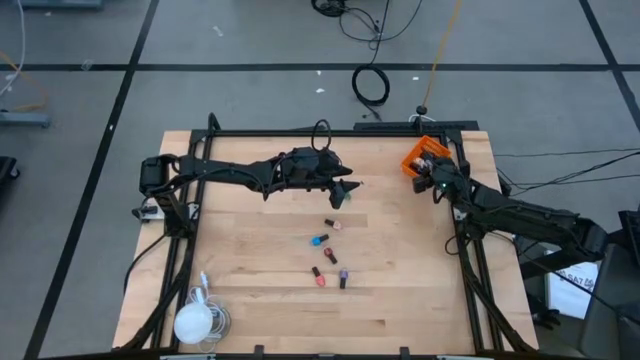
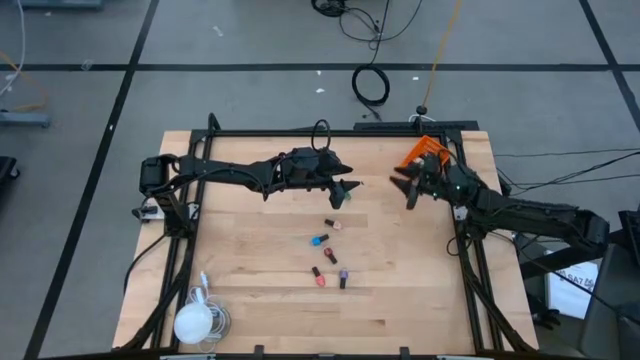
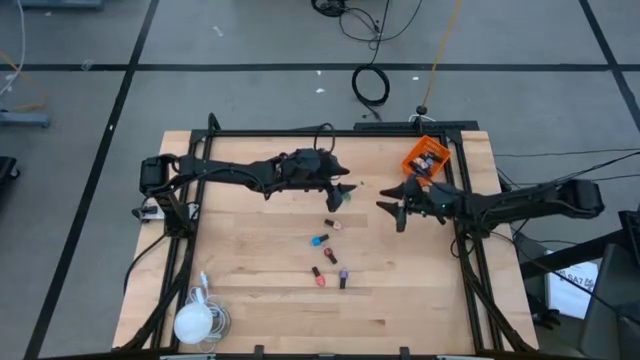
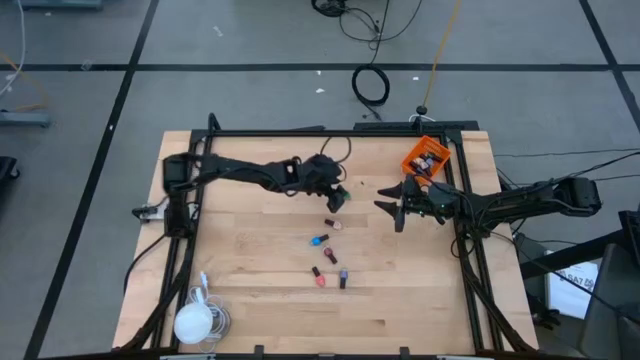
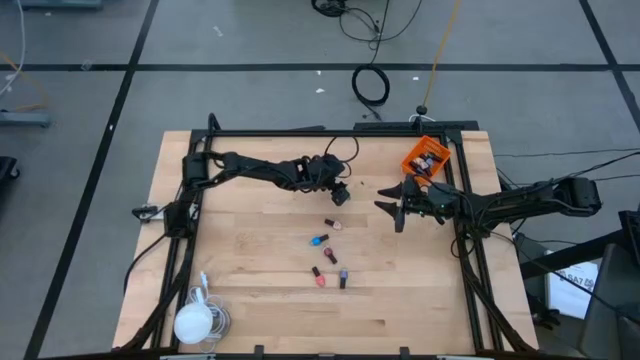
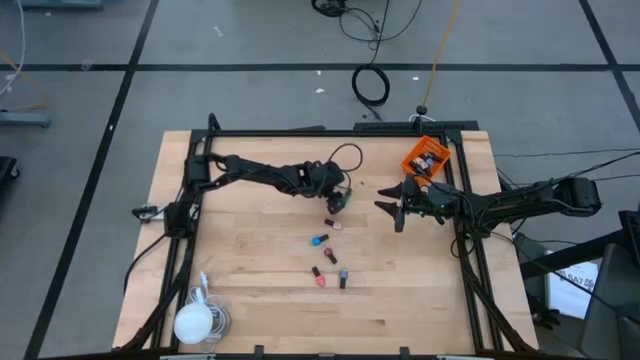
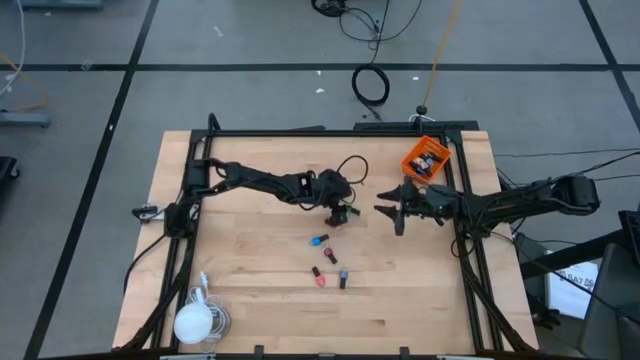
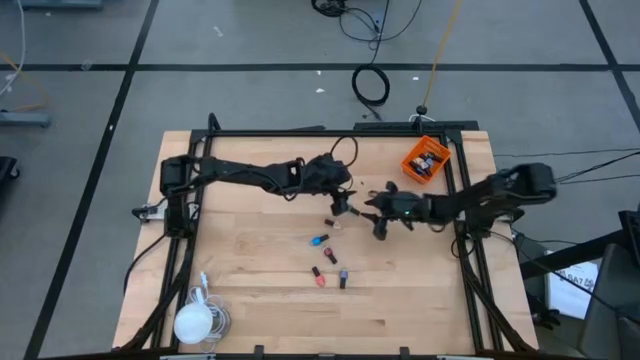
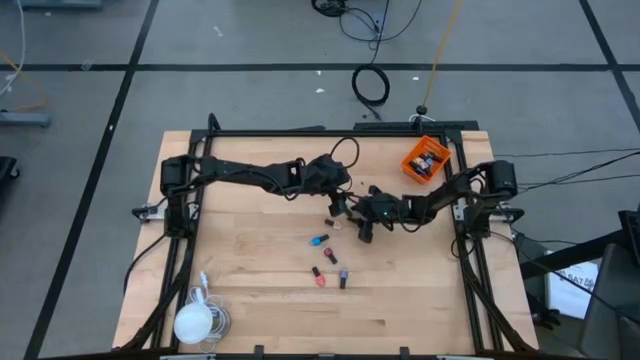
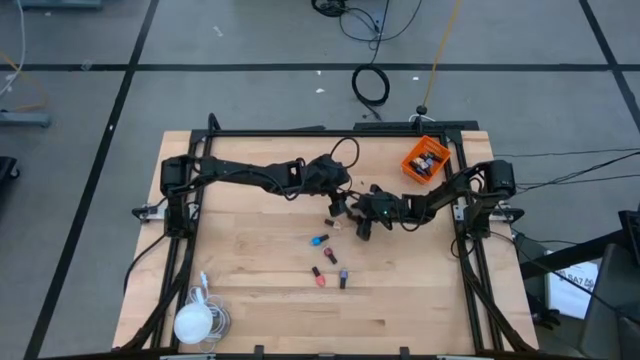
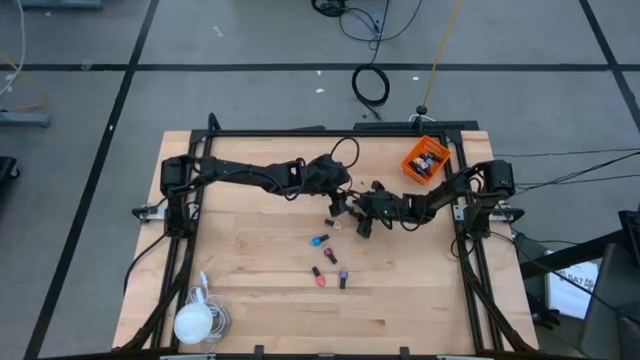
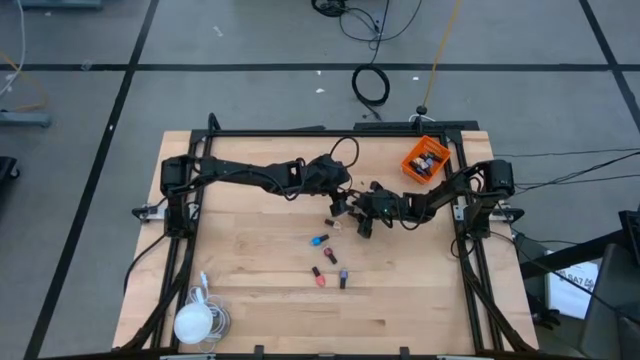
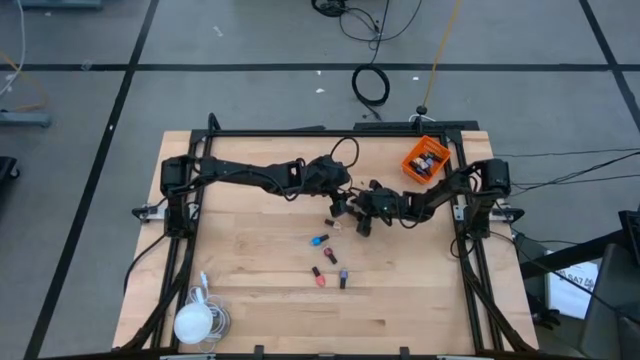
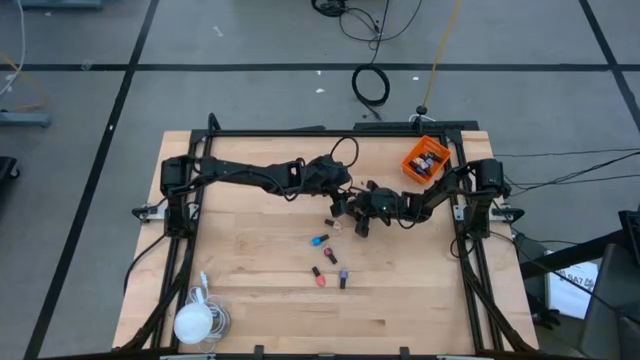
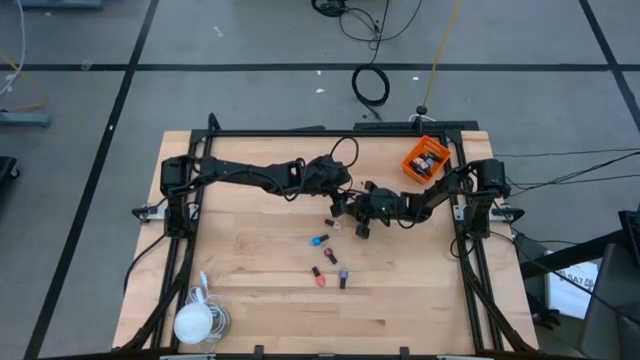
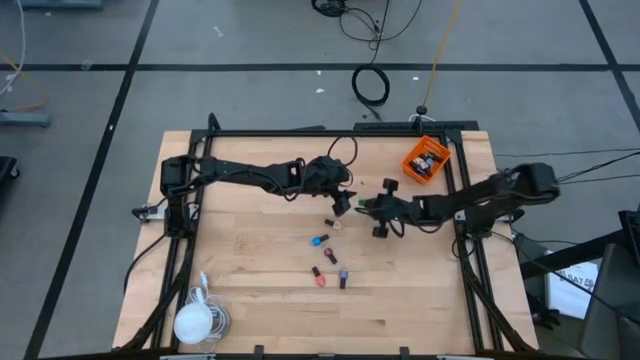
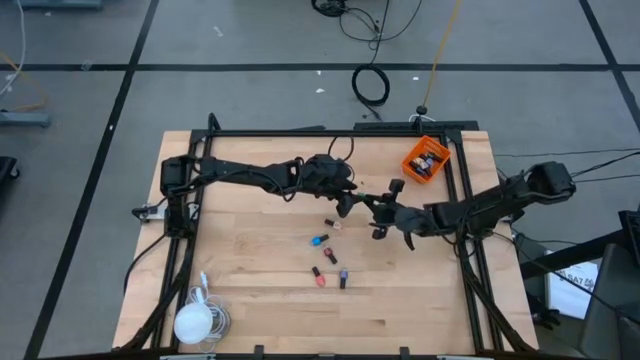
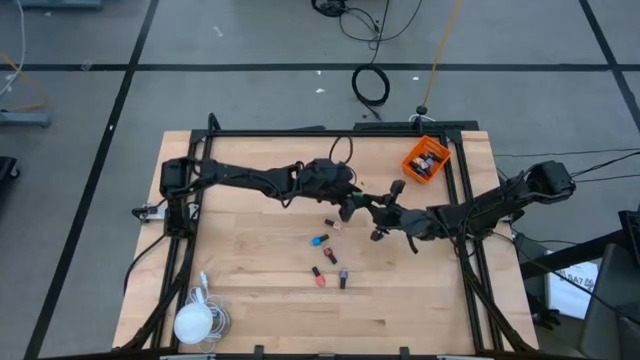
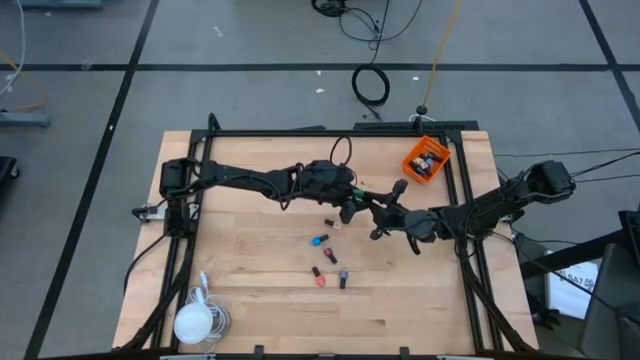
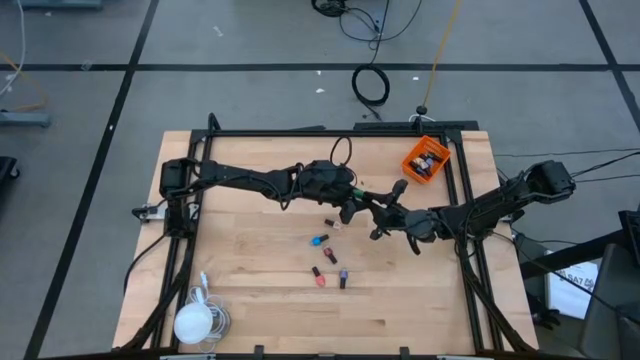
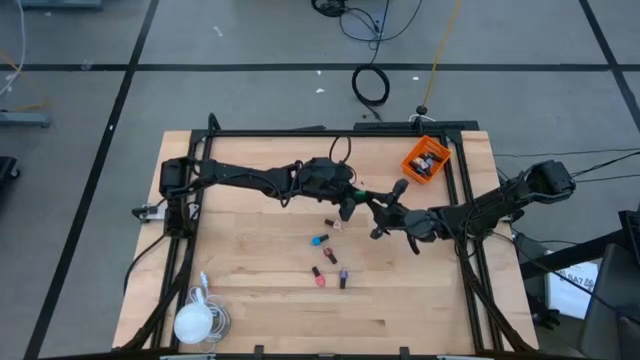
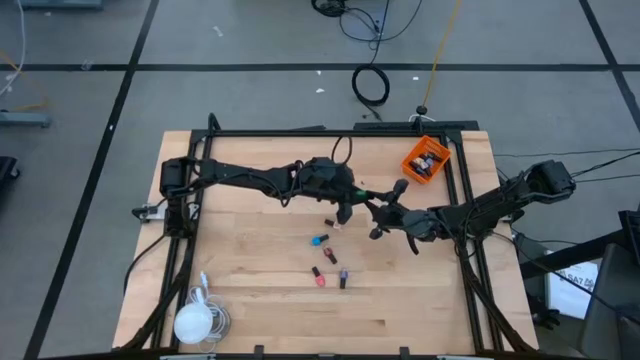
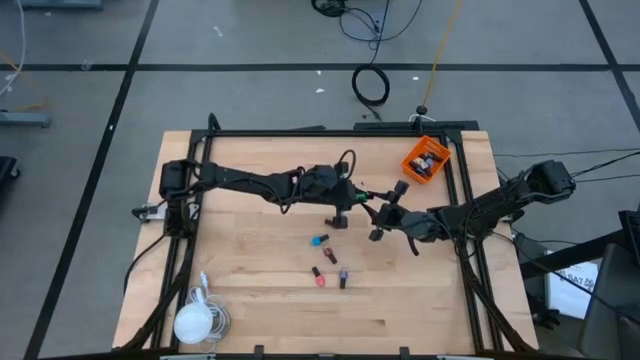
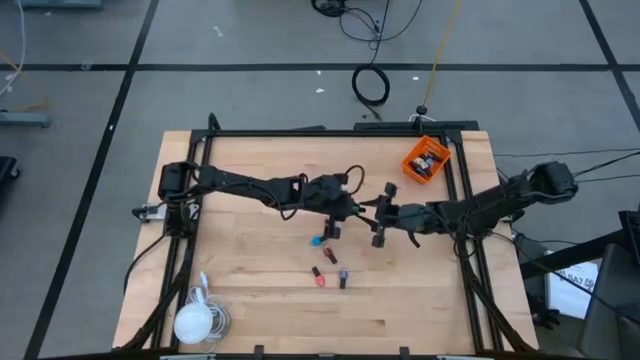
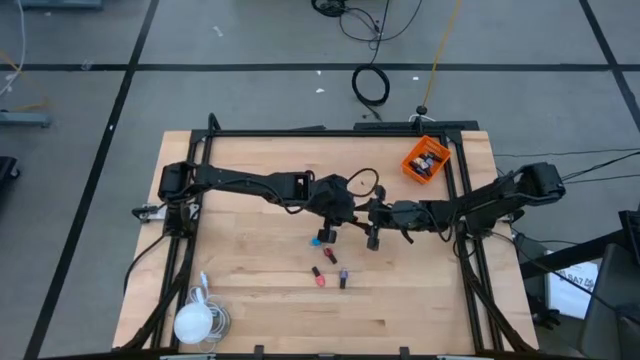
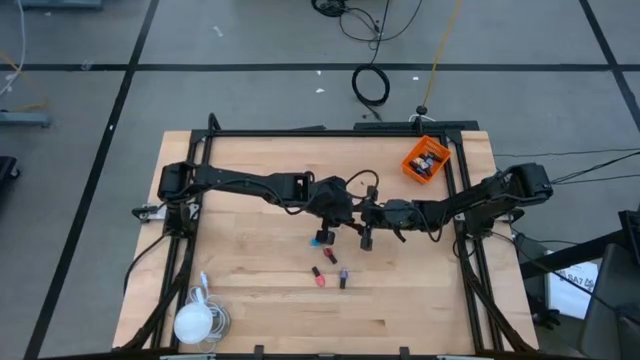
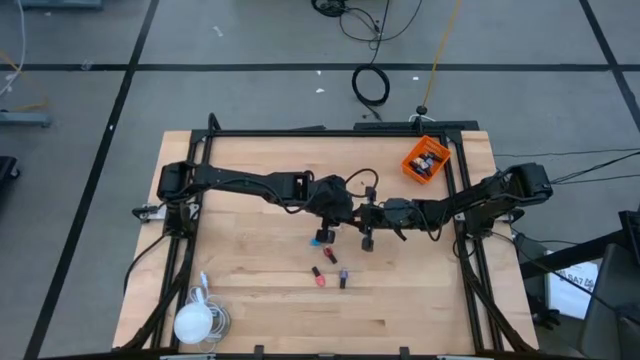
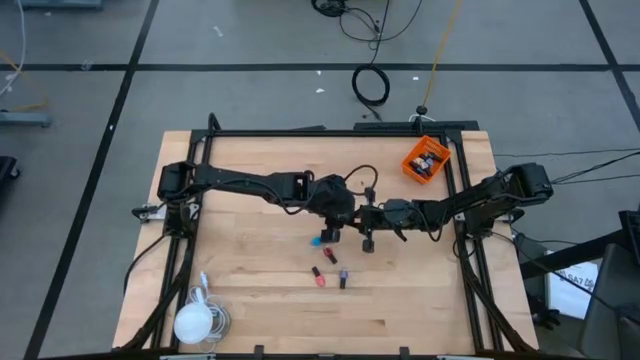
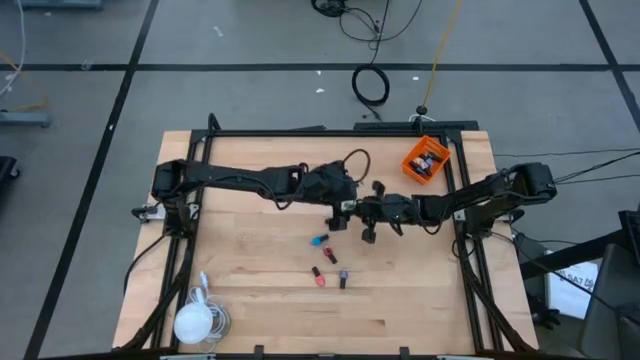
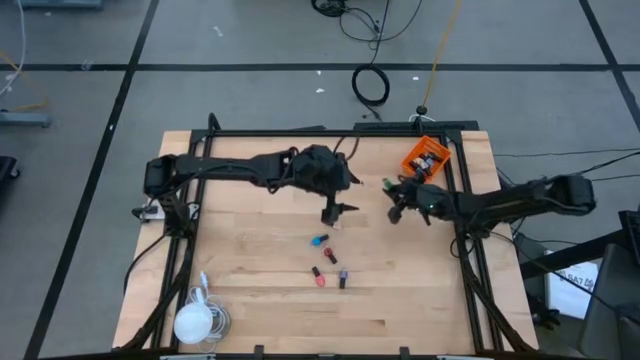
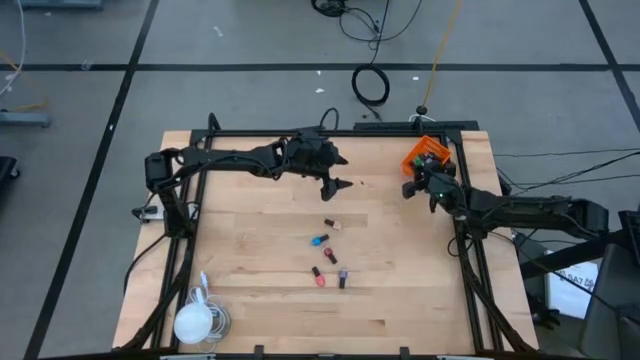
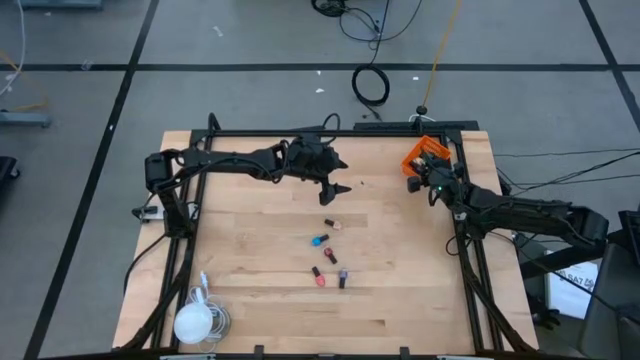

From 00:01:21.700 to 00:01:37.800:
Task: Pick & Place Nail Polish
Put the green nail polish bottle into the orange basket

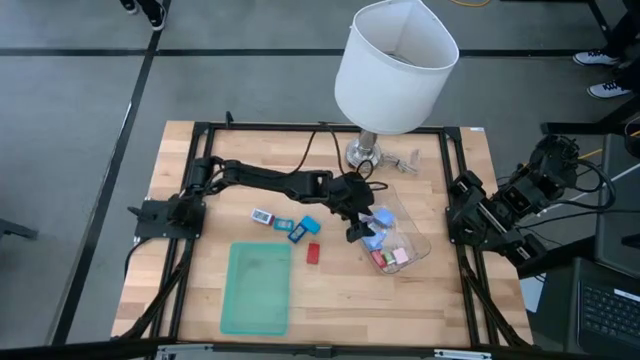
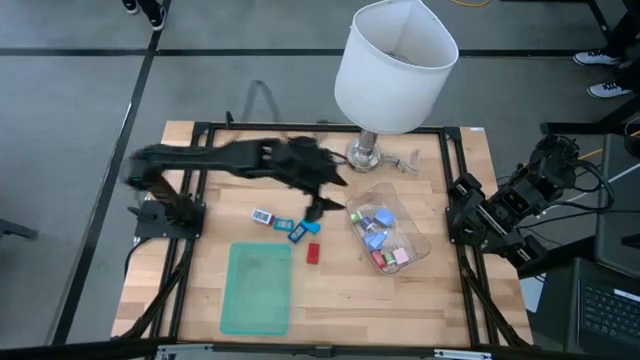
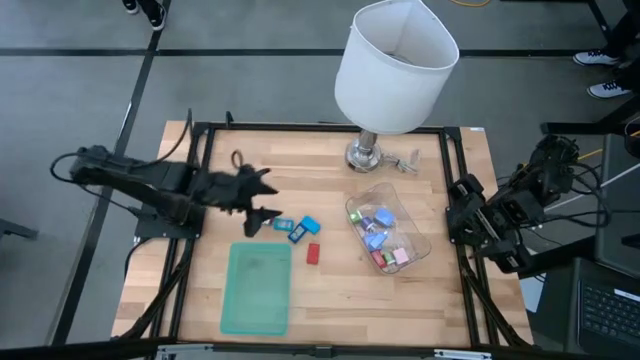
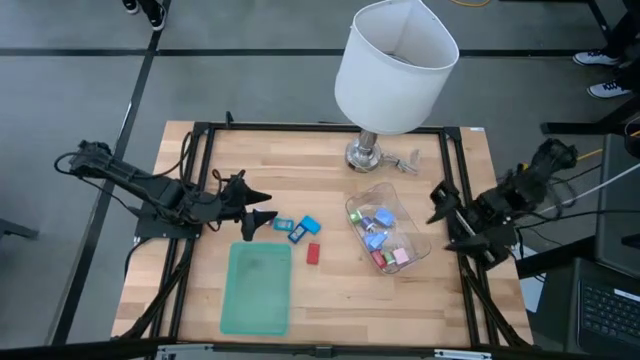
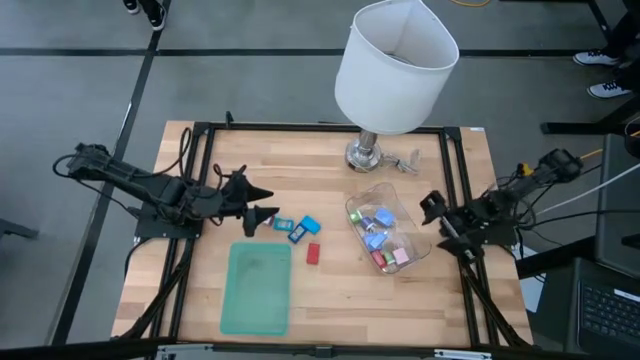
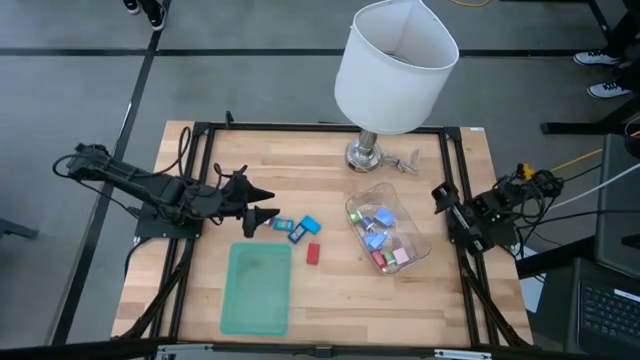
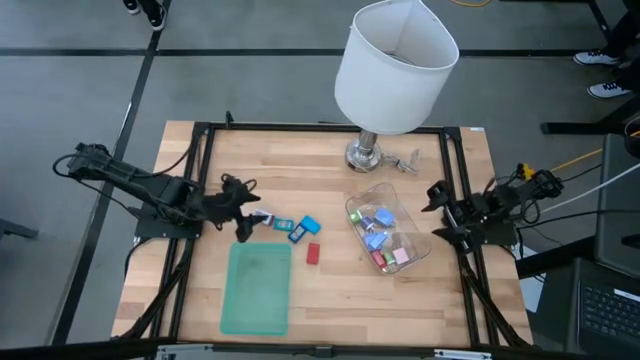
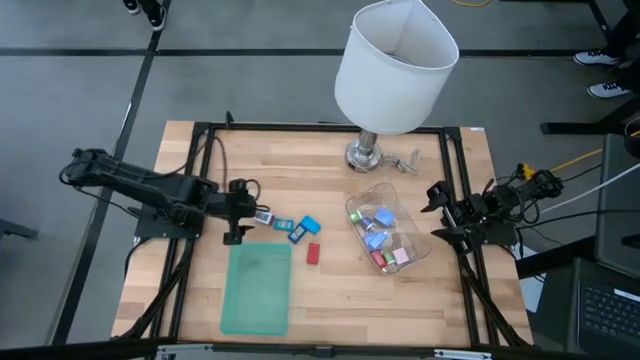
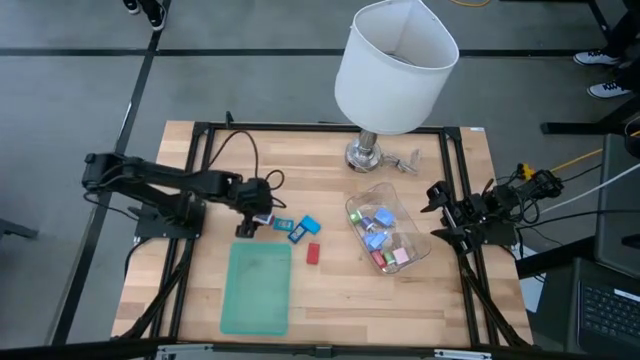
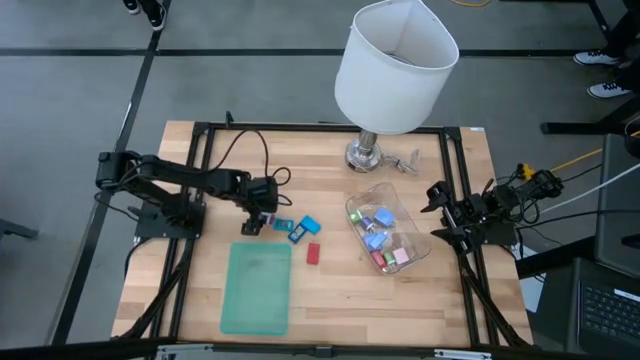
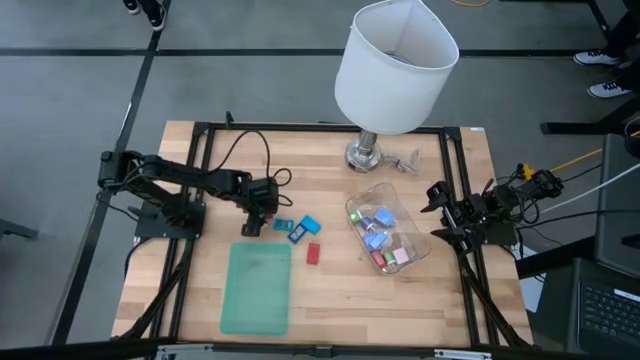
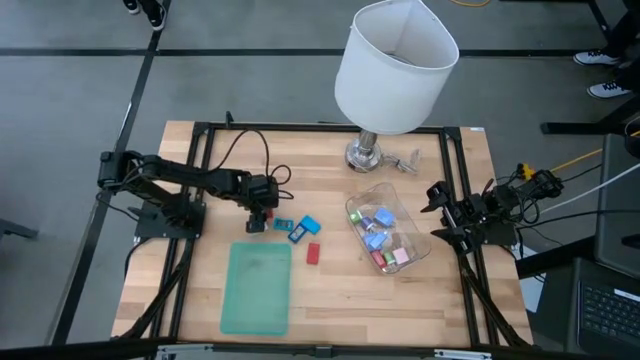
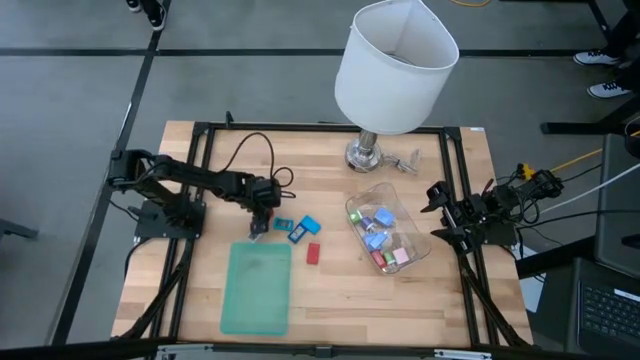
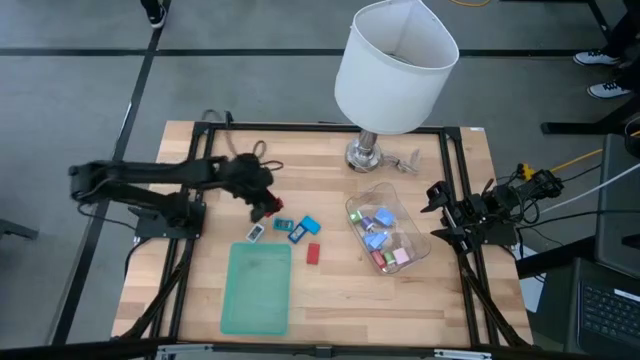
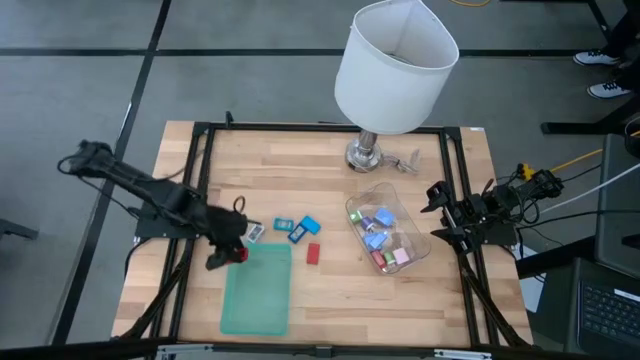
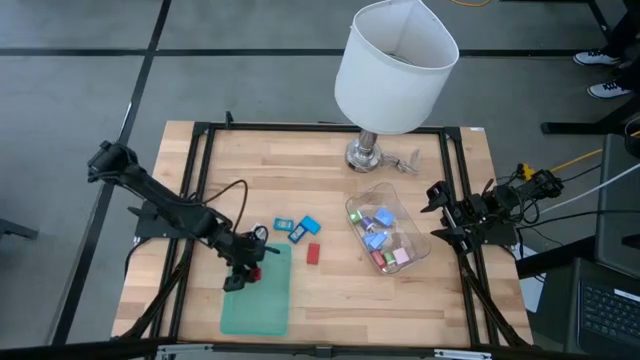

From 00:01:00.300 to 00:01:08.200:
Task: Pick & Place Office items
Put the left red digital clock into the green bin
